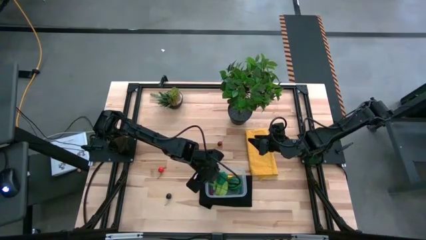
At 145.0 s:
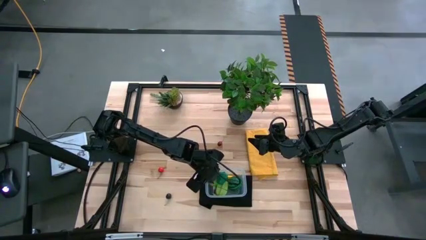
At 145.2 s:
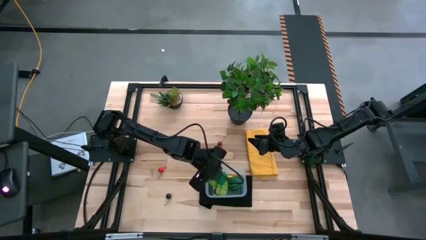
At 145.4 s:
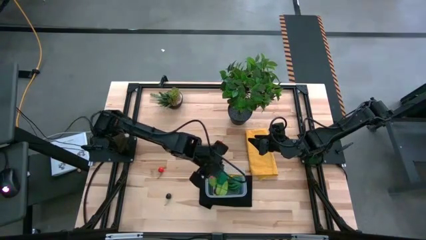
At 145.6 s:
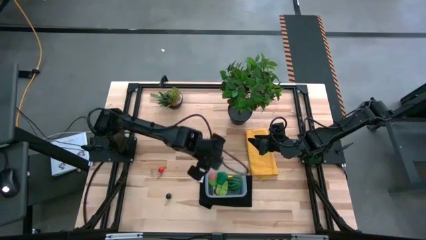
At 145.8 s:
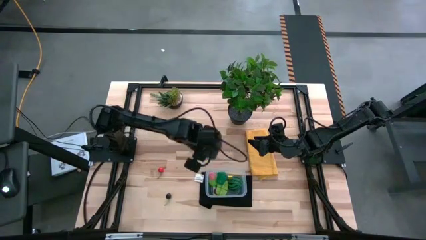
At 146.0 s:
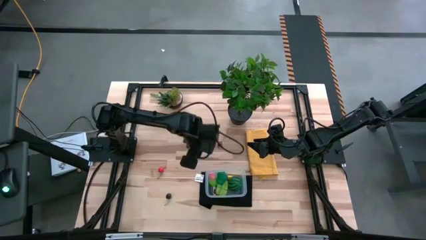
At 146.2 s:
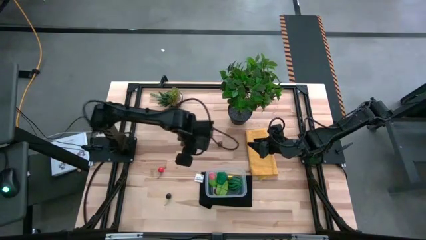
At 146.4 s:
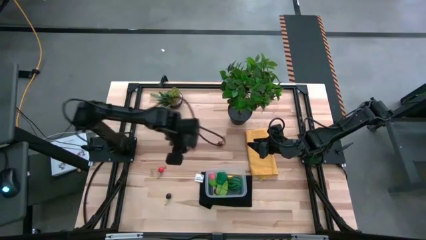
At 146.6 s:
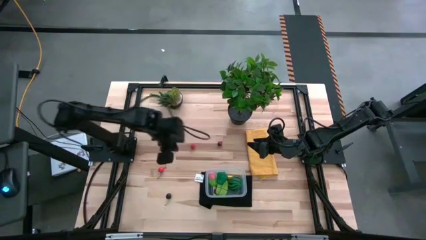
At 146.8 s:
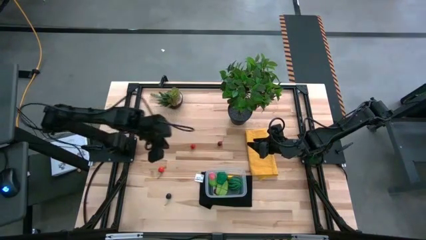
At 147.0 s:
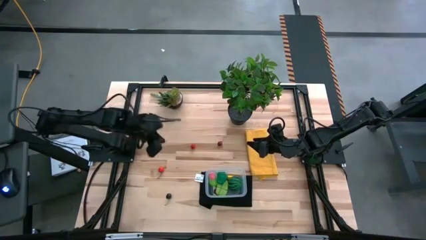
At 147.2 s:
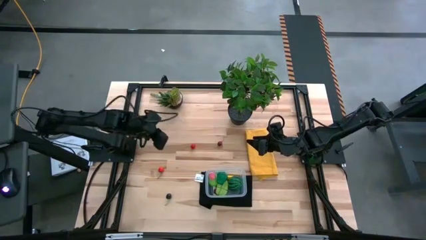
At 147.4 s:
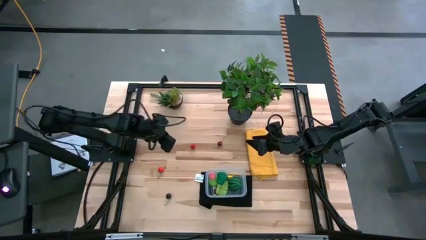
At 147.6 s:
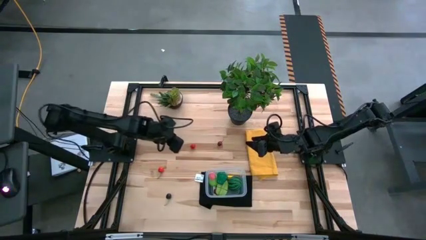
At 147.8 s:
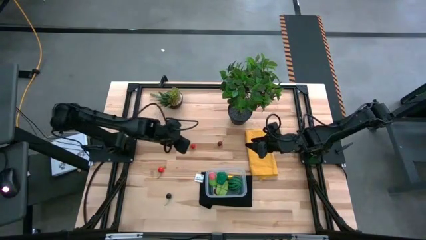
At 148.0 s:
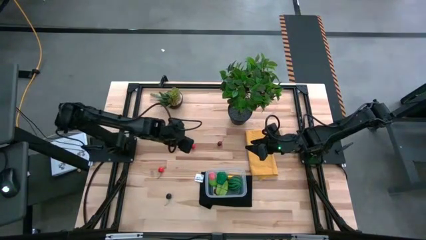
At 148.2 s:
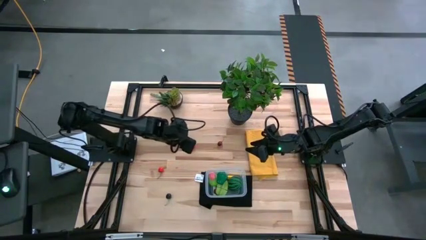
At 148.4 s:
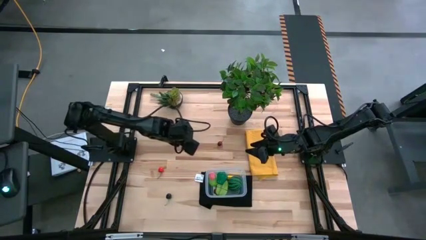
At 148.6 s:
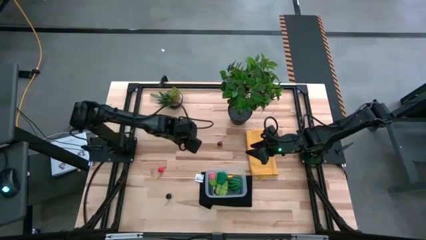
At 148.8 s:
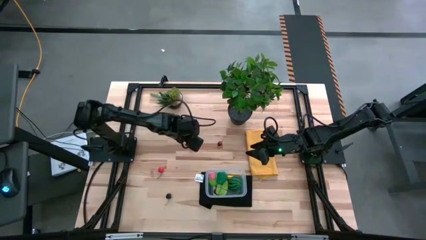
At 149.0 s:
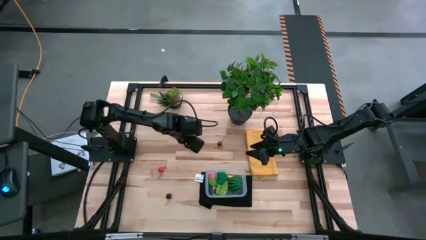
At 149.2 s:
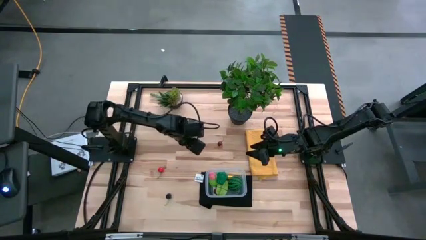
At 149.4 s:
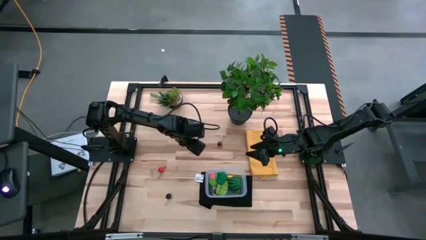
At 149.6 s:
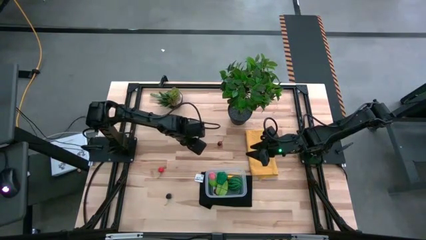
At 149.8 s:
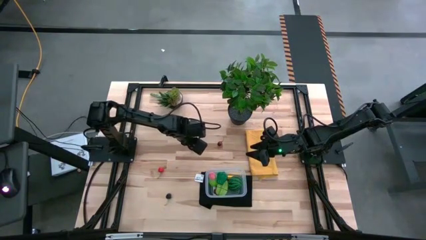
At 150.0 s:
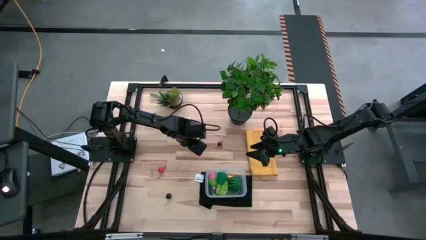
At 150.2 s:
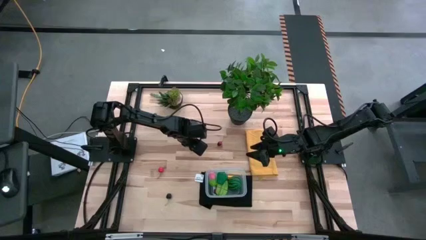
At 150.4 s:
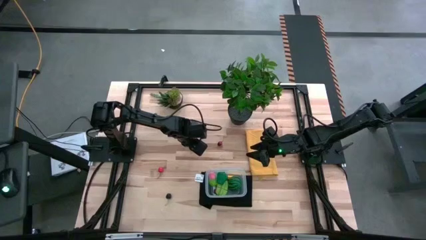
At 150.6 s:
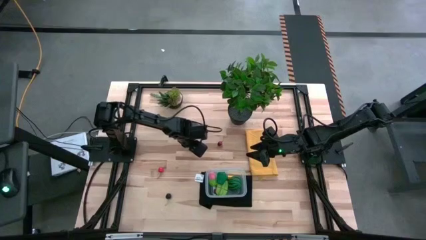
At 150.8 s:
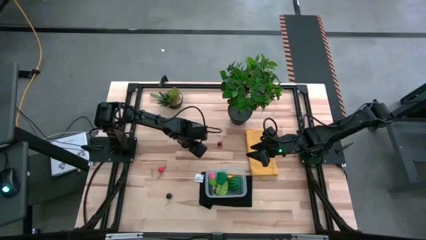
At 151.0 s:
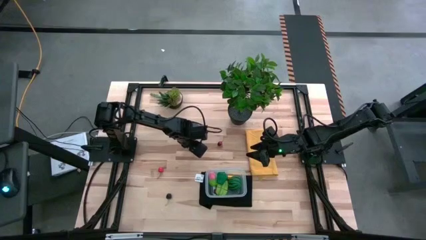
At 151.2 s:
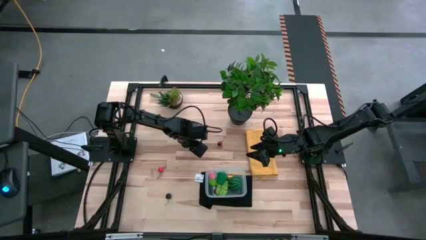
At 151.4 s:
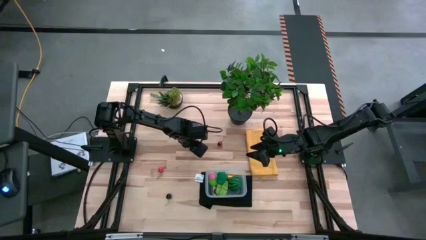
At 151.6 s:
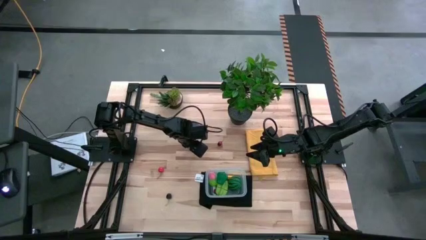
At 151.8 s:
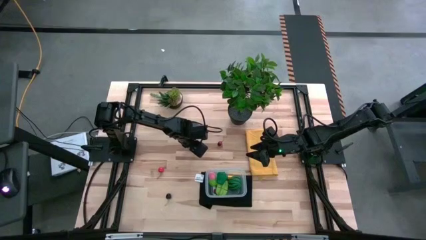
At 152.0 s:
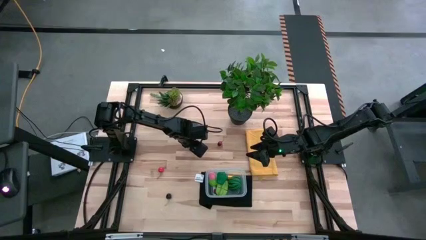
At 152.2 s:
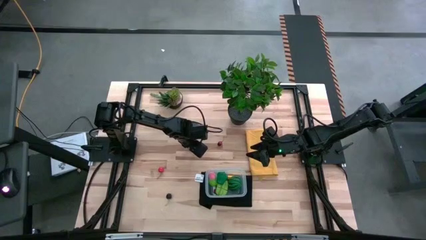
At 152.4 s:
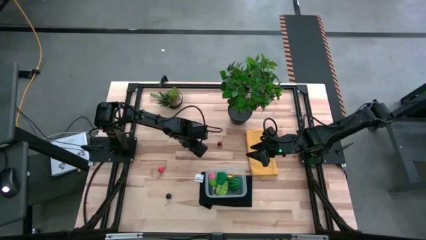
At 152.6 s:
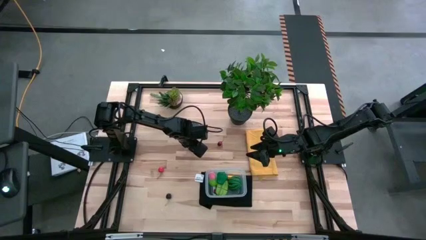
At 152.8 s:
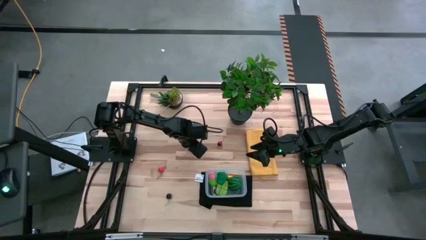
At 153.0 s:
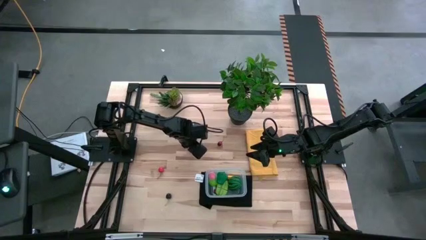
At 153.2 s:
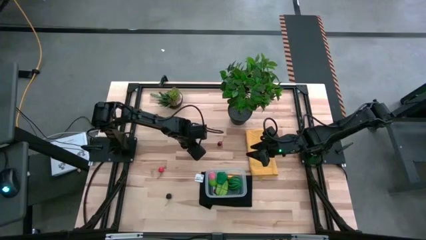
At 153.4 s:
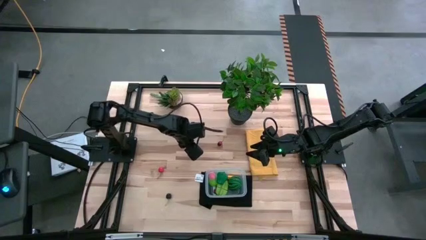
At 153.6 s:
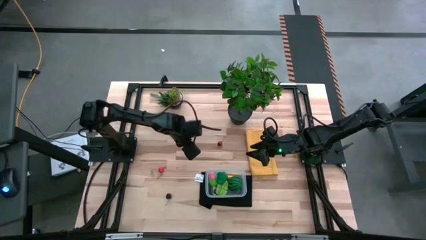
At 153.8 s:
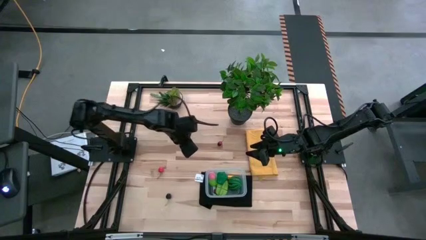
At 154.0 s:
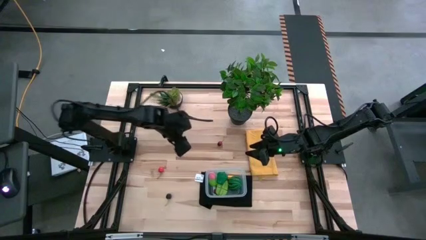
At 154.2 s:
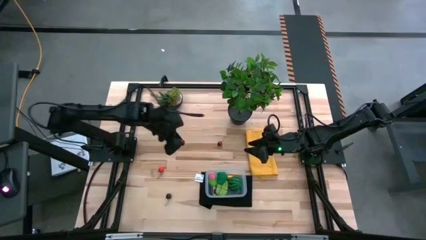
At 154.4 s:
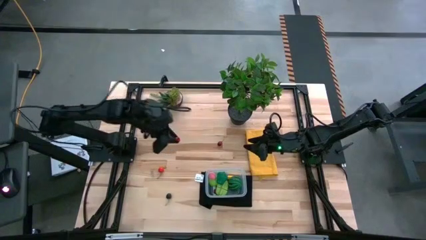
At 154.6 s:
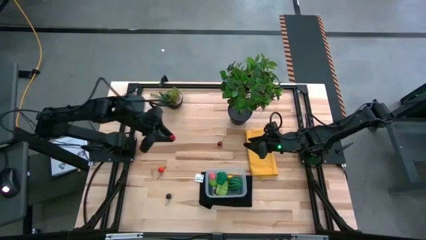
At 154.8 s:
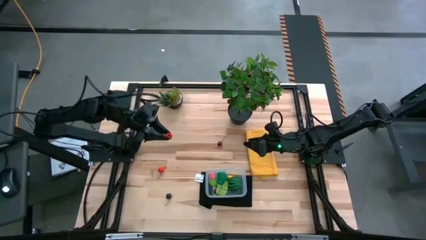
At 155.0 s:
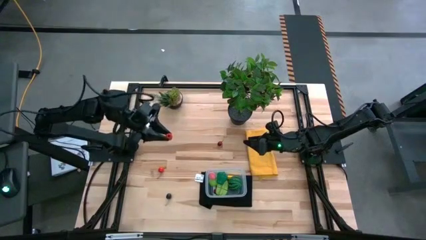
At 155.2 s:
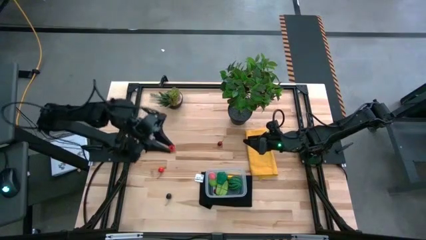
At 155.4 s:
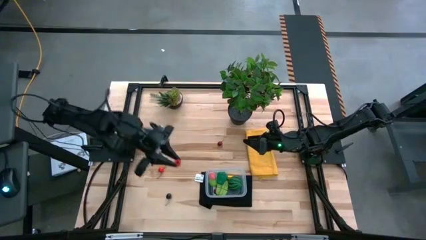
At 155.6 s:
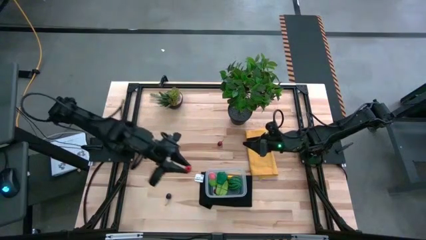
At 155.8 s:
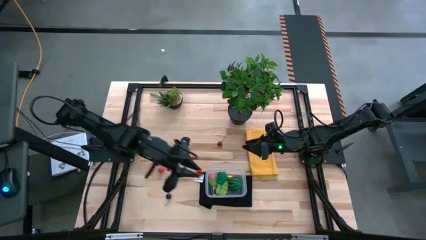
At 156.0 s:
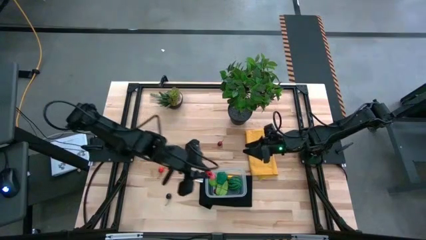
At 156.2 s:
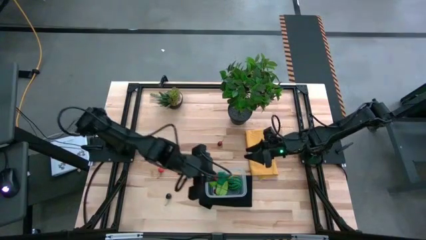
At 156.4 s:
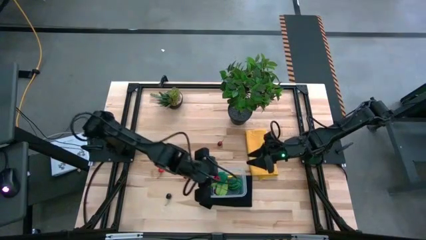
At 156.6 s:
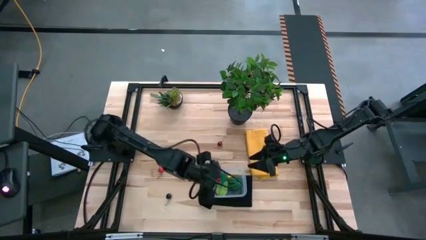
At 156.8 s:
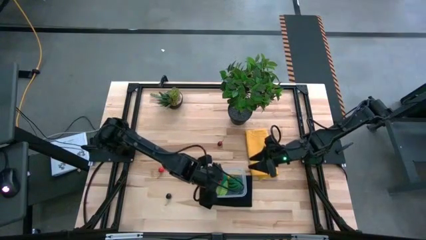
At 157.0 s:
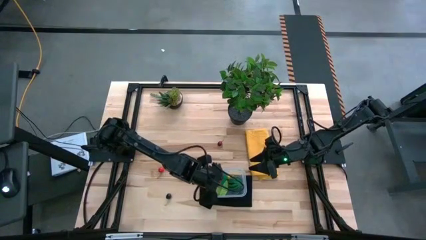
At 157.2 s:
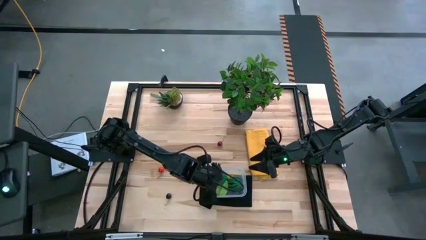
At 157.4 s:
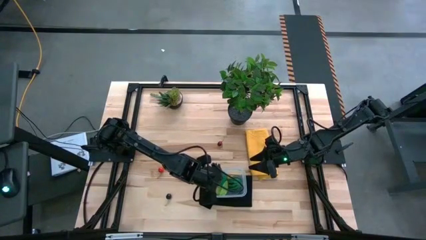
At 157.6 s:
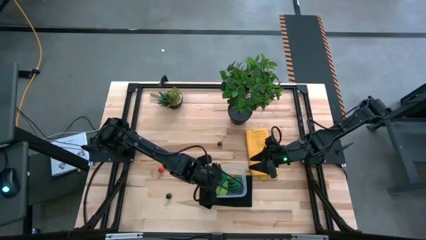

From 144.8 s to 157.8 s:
Task: Pick and placing Produce into tupperware
Put the raspberry into the transparent bin

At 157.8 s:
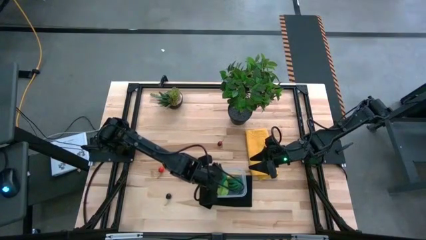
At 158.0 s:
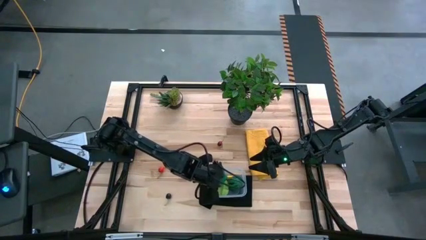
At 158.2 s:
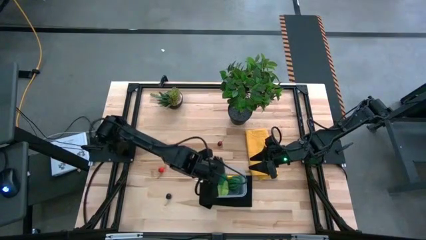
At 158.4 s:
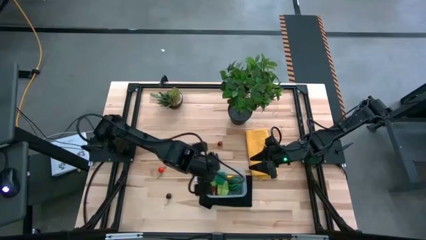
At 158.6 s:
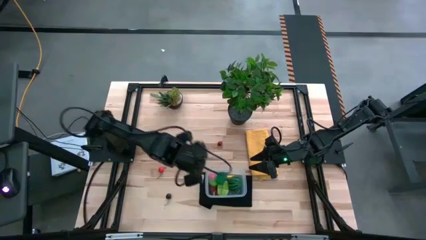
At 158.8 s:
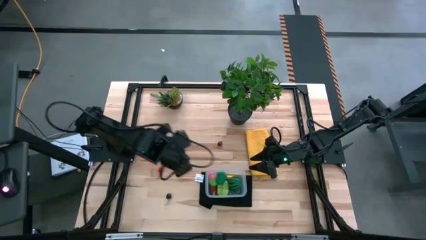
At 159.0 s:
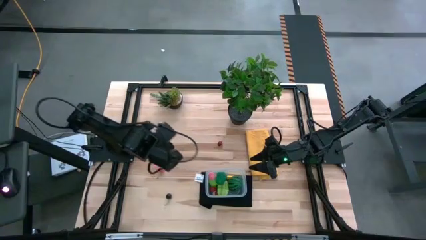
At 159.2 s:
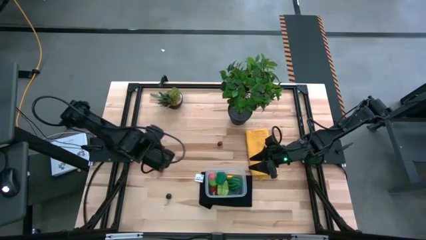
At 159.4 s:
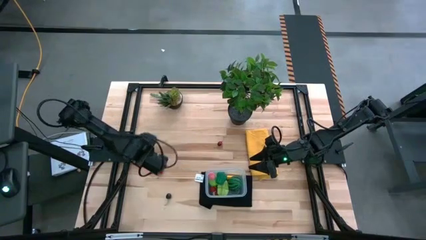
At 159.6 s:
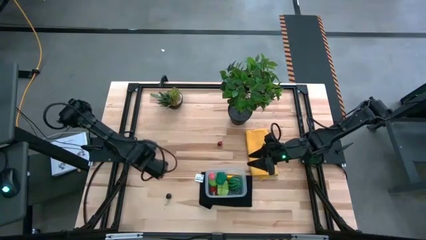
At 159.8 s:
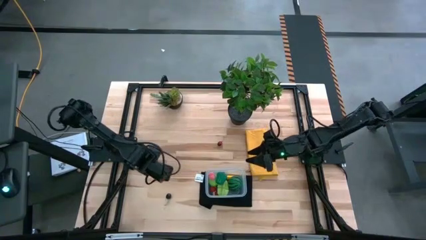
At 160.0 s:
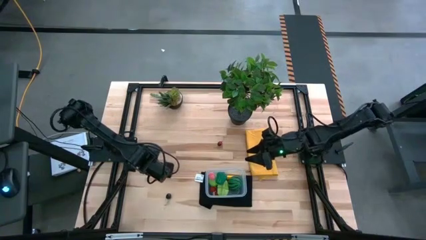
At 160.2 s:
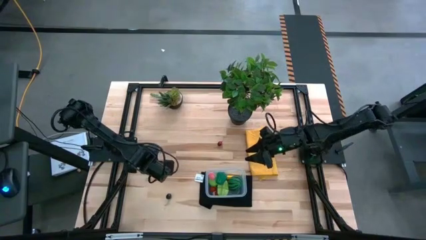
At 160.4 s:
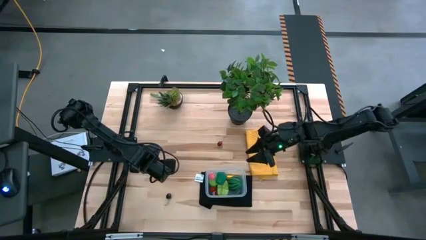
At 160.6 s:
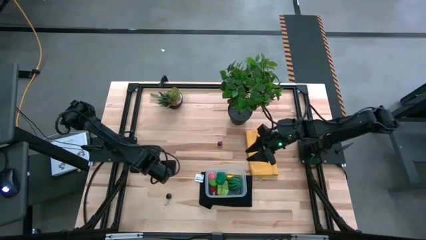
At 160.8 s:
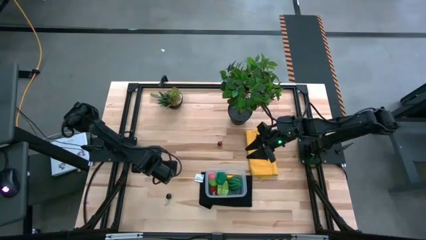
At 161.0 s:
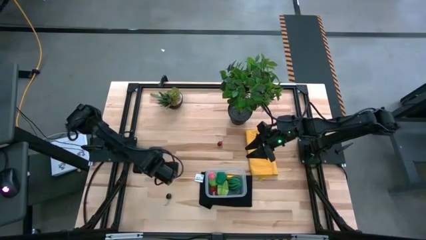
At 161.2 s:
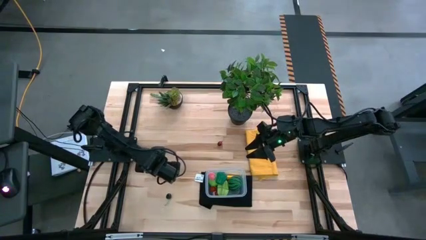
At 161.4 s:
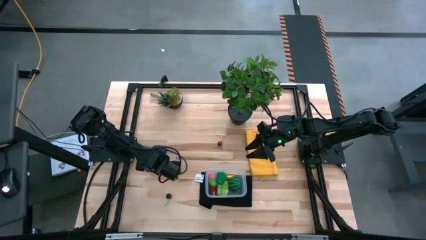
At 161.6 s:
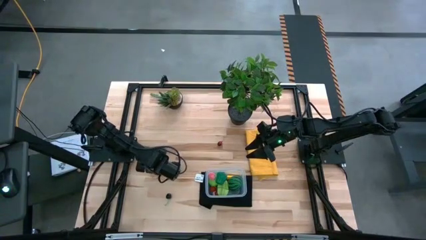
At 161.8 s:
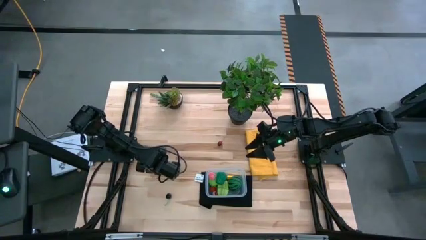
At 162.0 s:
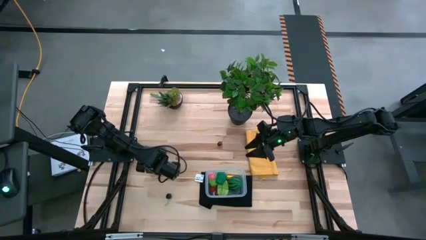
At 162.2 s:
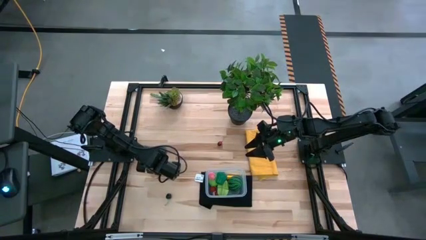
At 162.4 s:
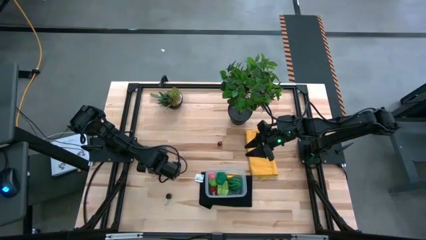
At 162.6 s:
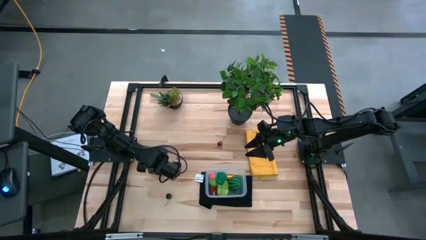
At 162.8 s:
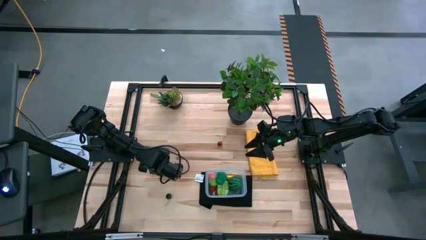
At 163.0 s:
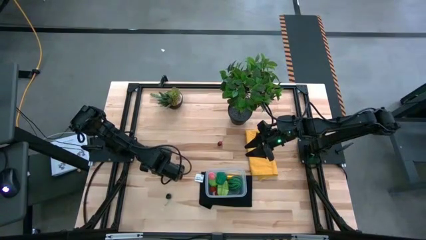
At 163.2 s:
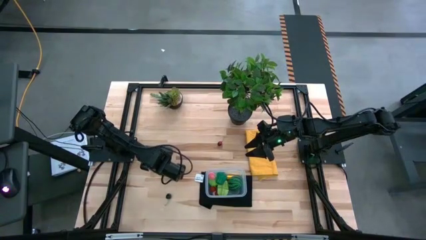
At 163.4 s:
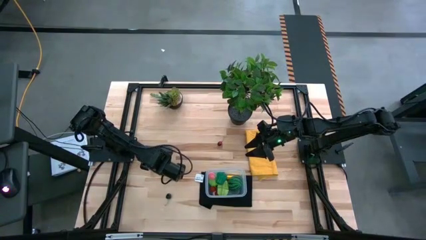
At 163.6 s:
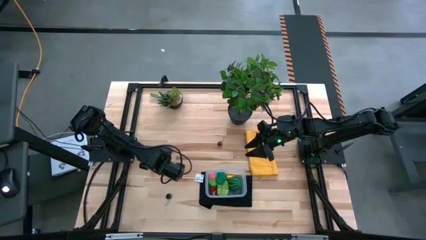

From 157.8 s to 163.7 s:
Put the left red cherry into the transparent bin
